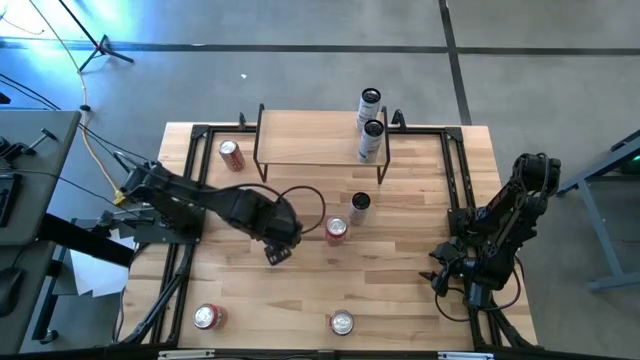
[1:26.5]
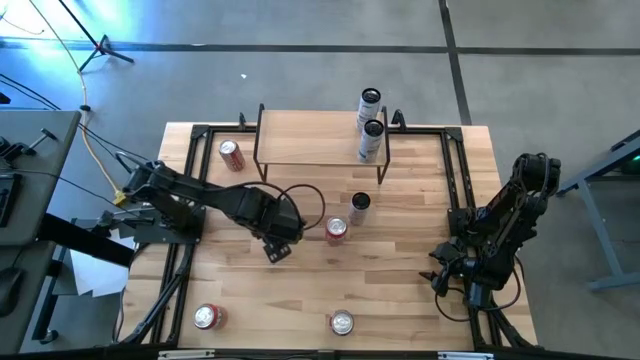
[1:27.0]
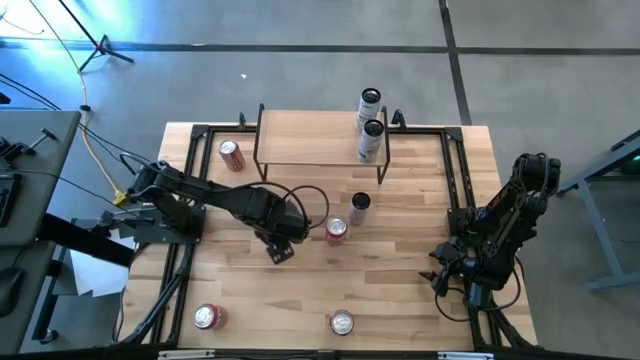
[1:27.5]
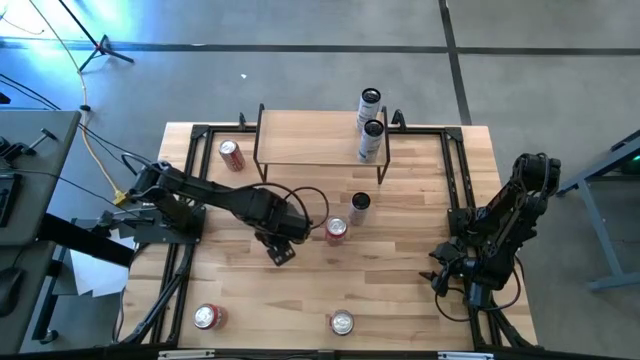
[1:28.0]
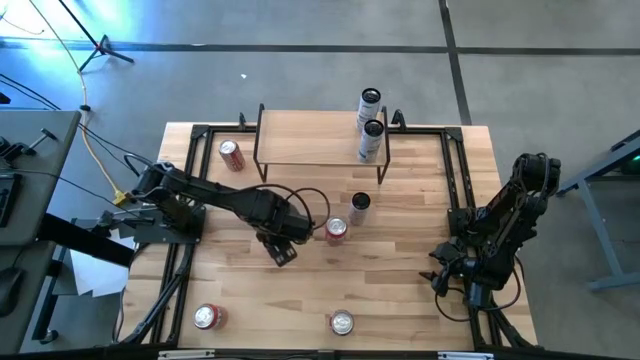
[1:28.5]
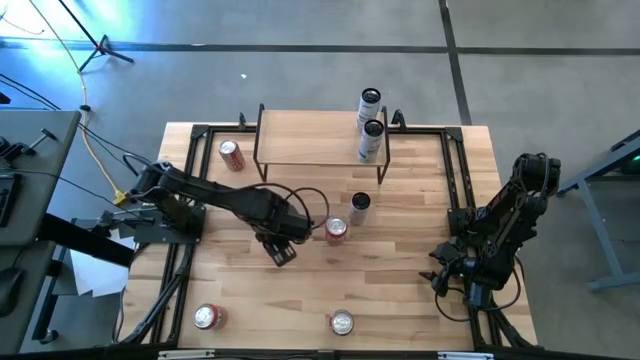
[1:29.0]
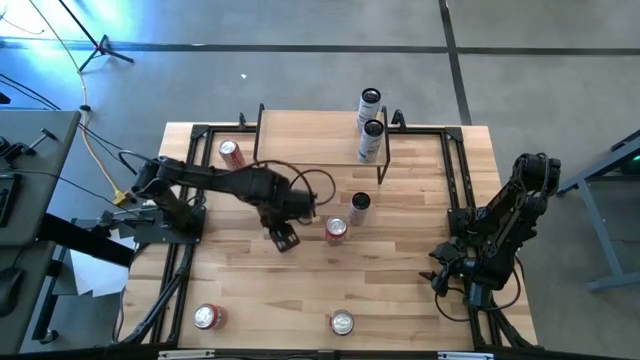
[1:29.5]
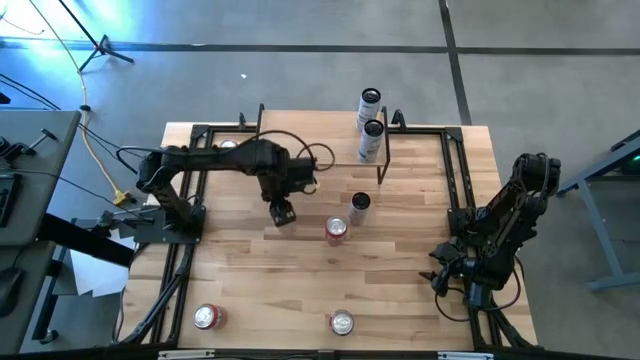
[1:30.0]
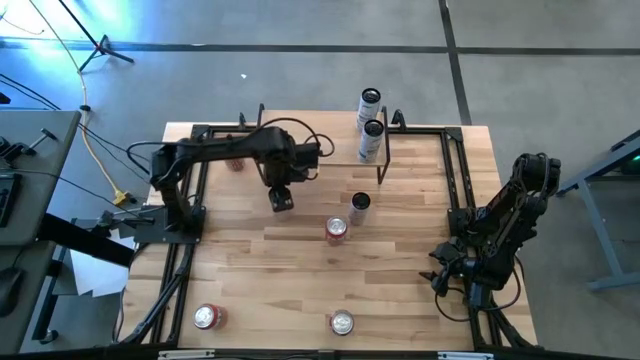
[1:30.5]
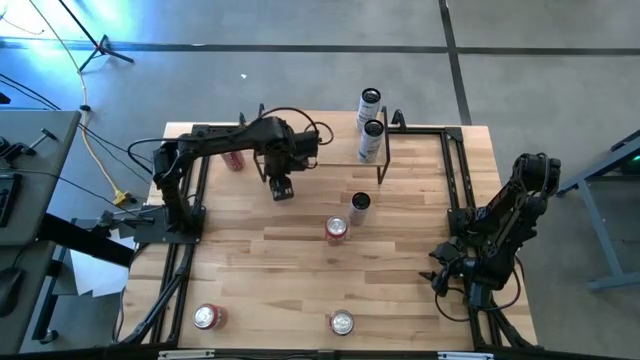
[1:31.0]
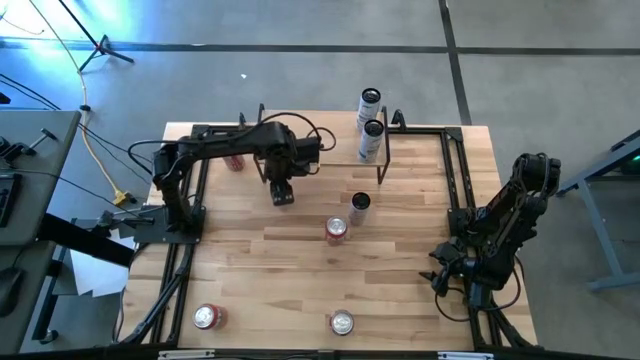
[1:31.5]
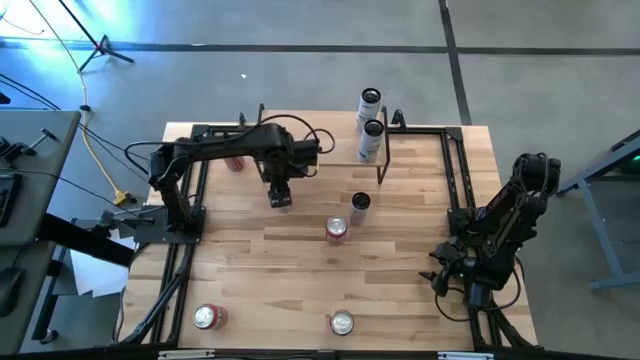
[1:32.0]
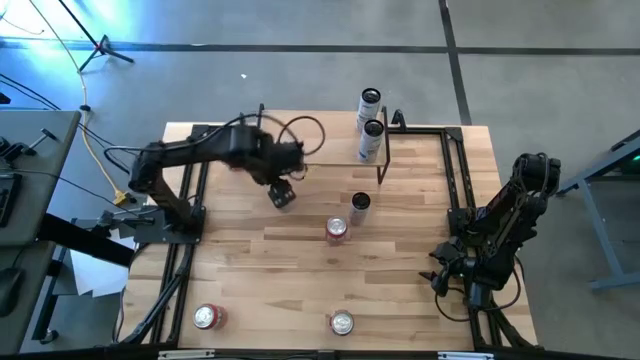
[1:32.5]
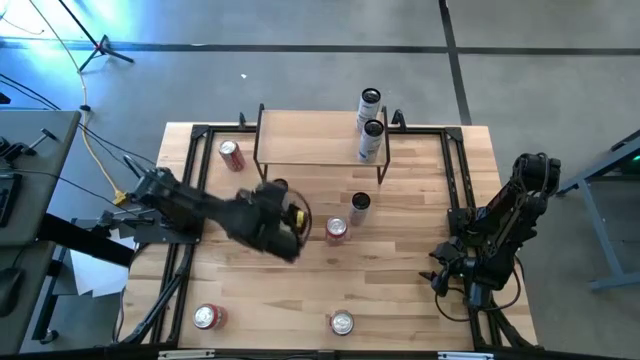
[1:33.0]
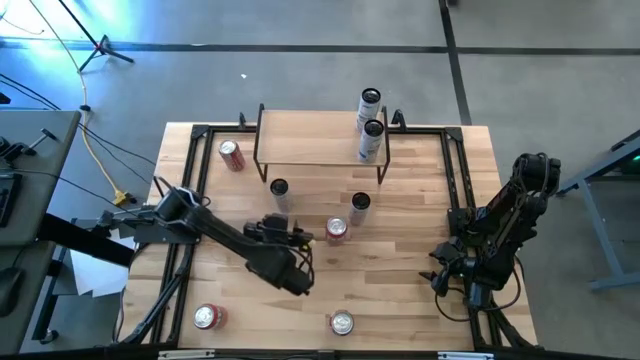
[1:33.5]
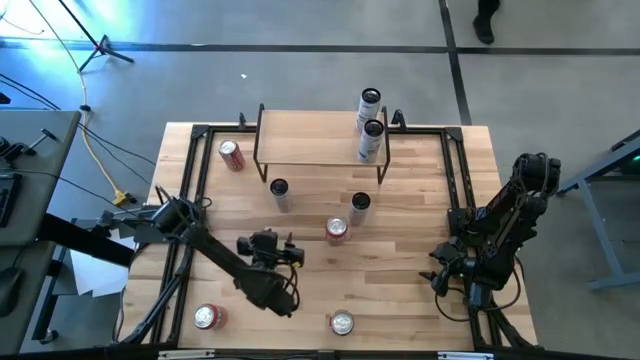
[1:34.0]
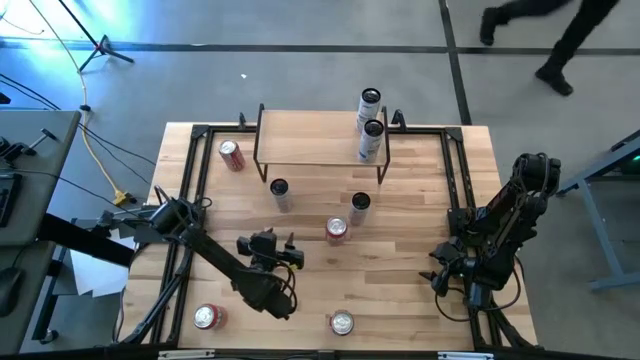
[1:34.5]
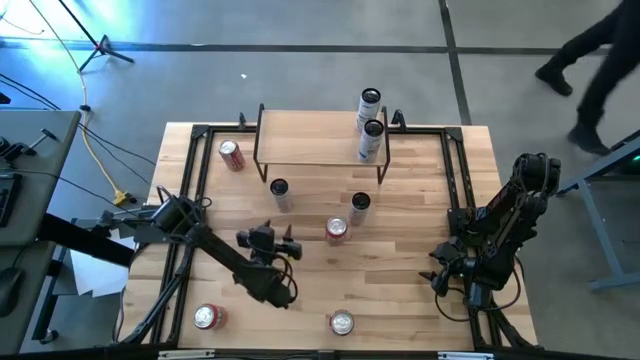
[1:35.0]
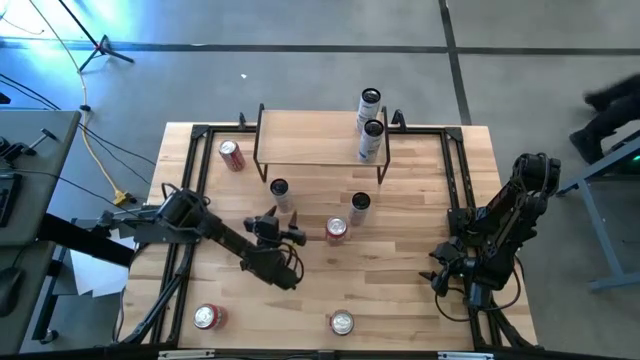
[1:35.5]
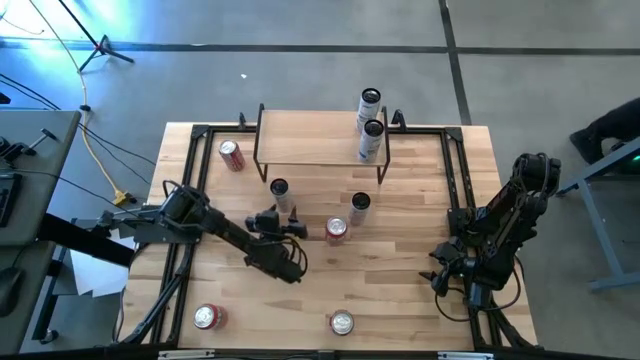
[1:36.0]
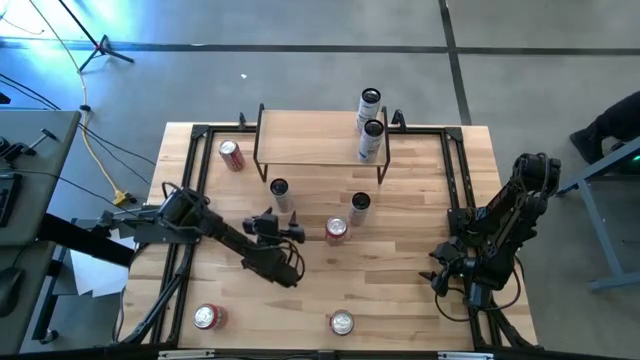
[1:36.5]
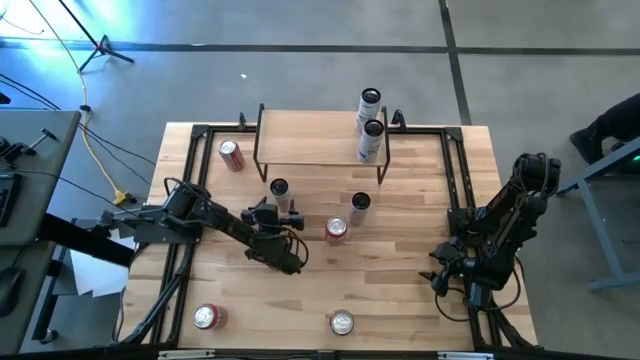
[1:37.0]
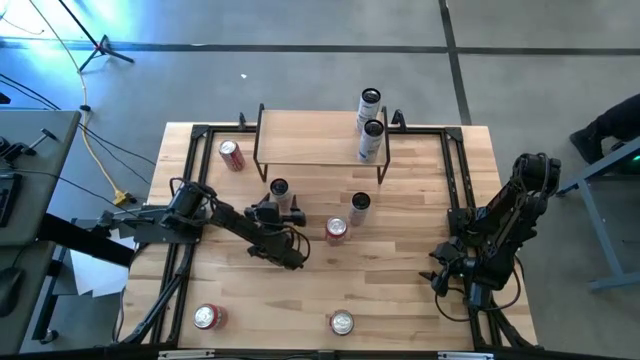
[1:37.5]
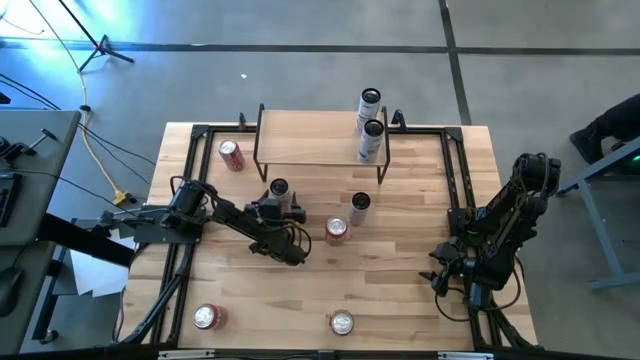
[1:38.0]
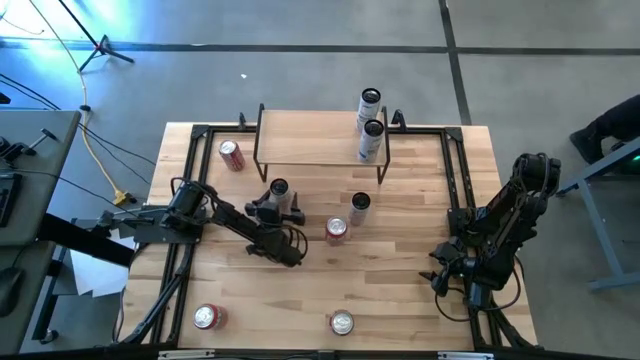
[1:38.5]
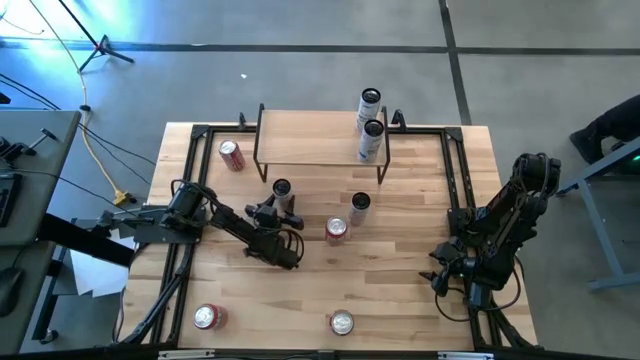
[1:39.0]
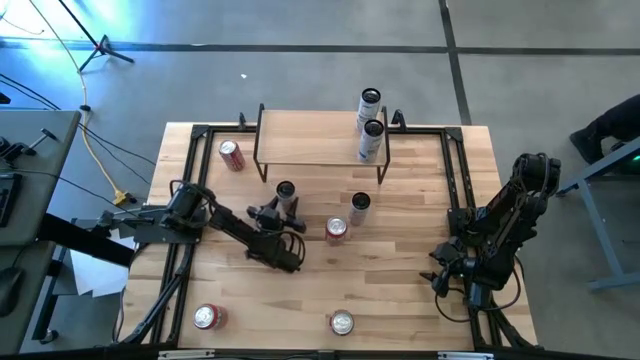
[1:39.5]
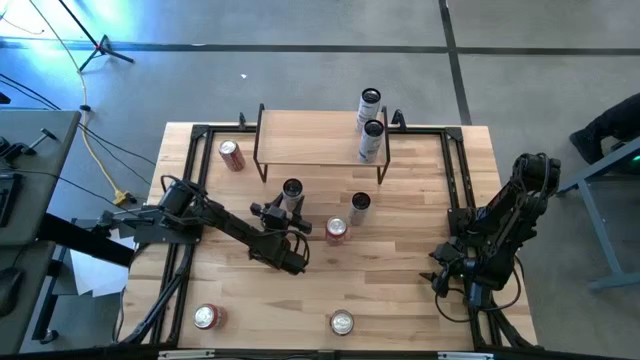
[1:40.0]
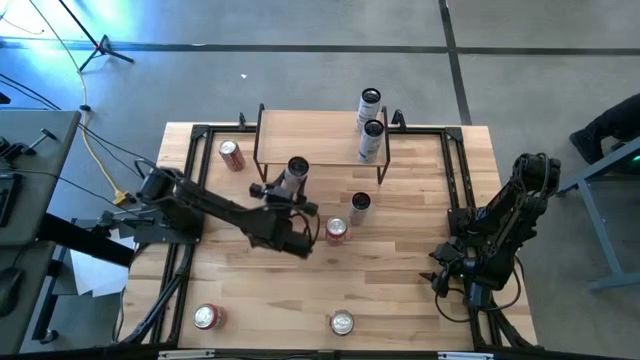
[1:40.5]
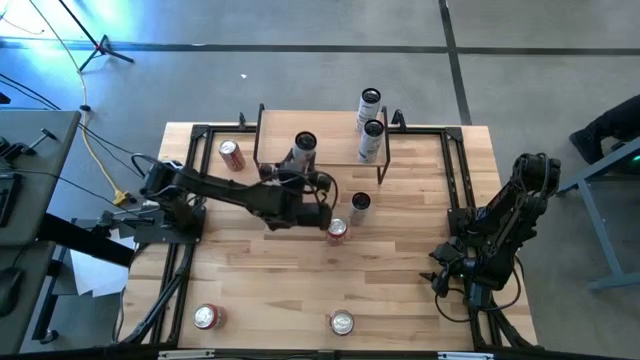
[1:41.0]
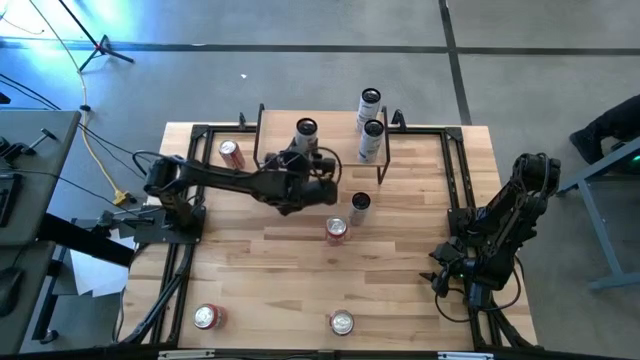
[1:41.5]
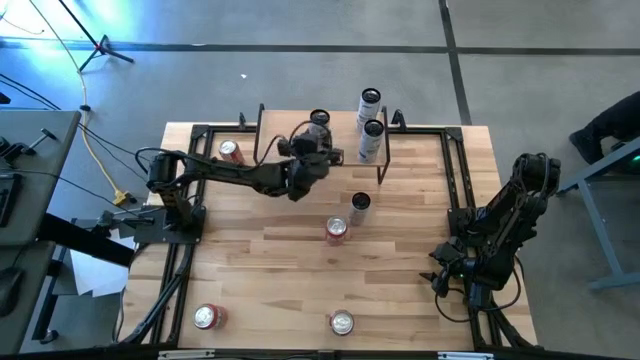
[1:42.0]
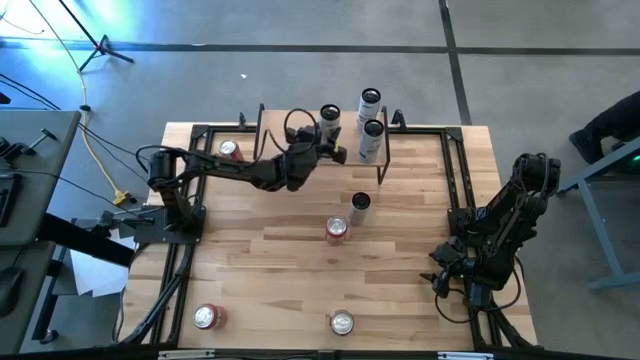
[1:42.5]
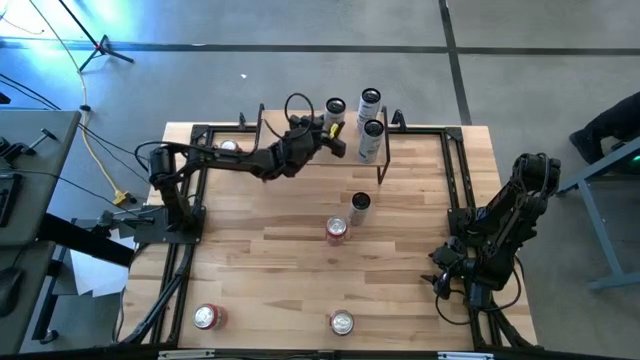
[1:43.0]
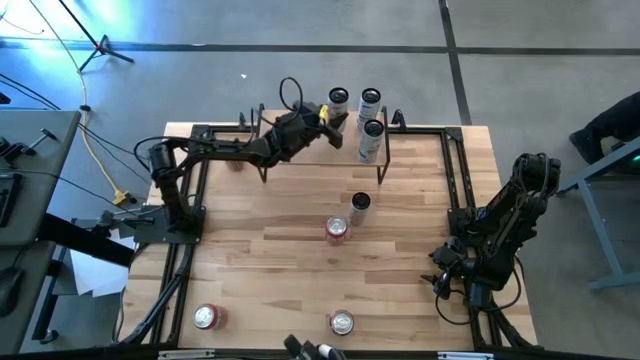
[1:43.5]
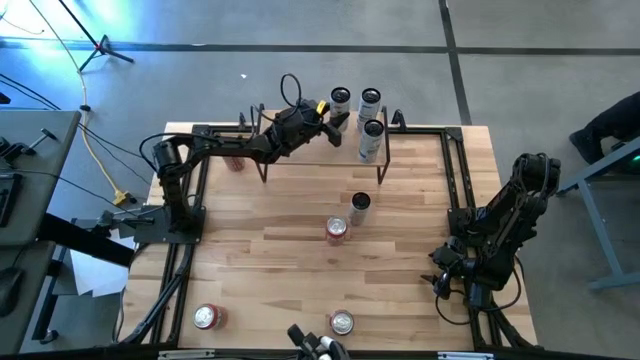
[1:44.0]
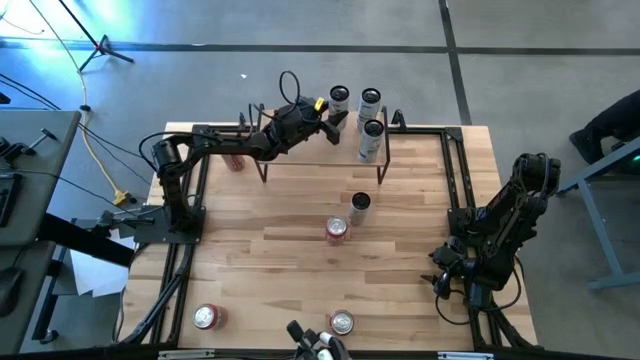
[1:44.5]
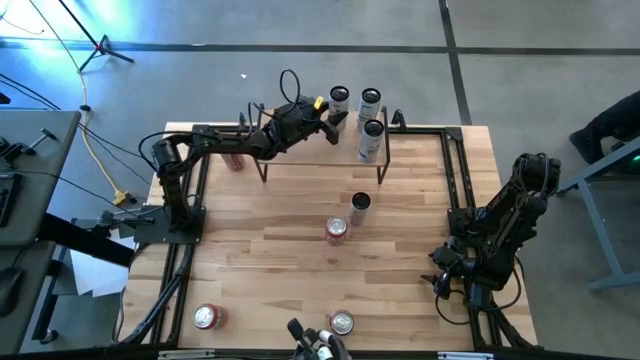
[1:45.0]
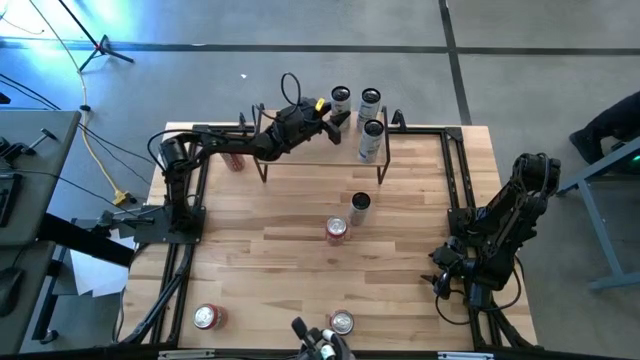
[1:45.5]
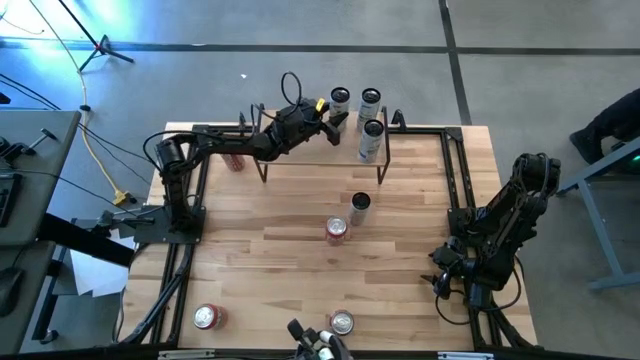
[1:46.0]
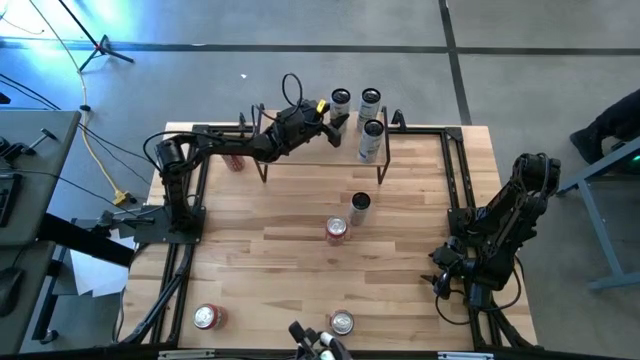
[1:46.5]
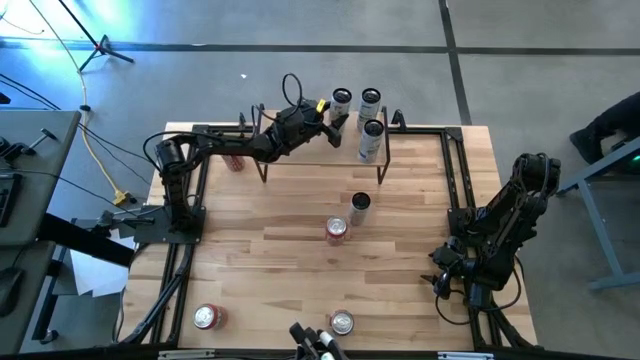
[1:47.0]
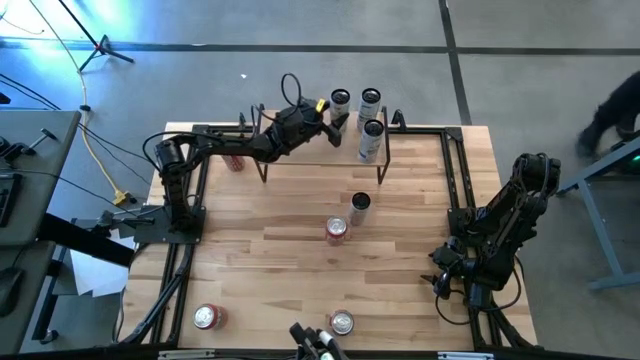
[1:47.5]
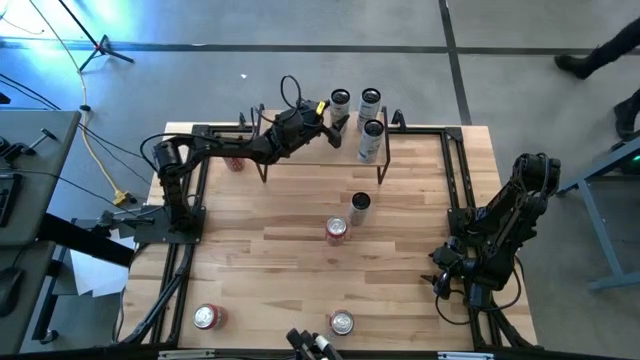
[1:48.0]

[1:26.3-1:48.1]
Task: Place canned beverage on shelf
Put the left white yellow soda can on the shelf
